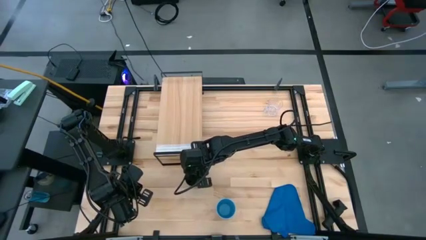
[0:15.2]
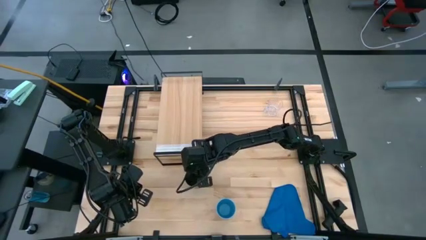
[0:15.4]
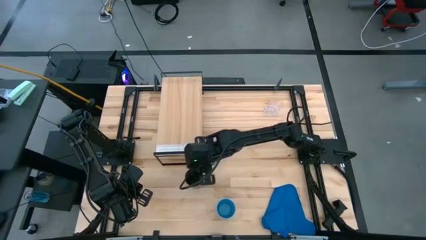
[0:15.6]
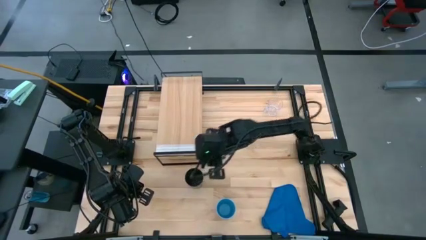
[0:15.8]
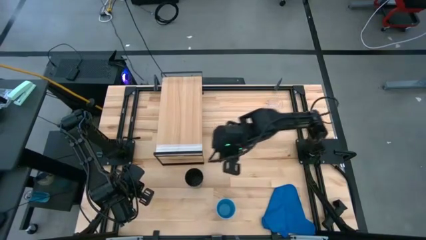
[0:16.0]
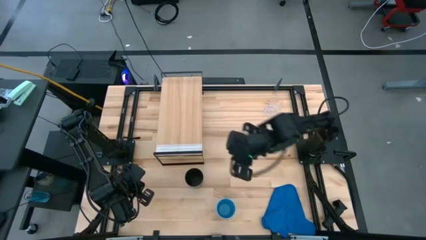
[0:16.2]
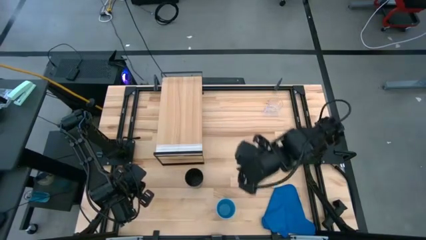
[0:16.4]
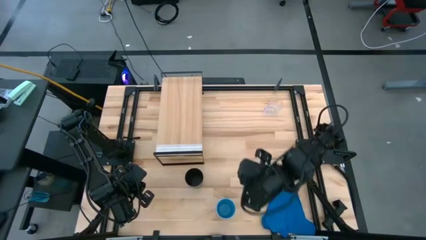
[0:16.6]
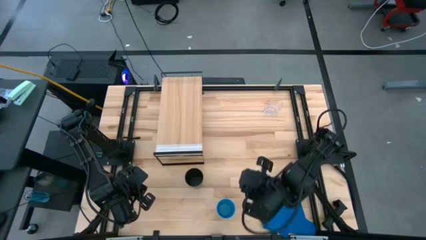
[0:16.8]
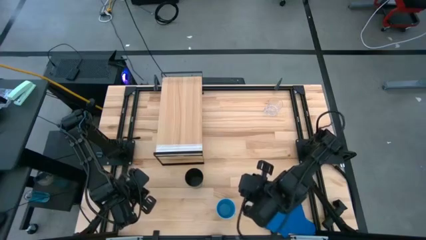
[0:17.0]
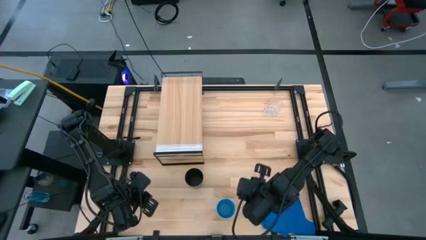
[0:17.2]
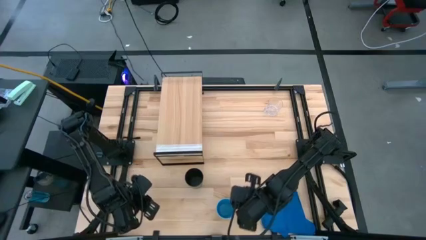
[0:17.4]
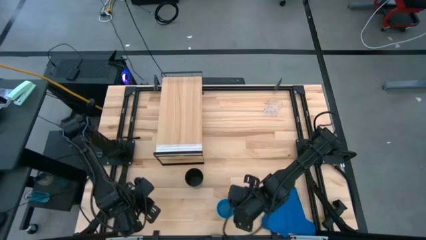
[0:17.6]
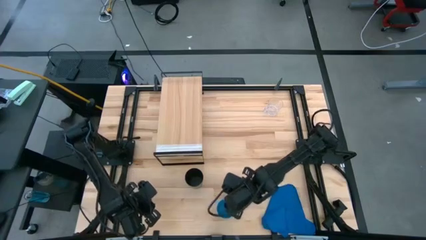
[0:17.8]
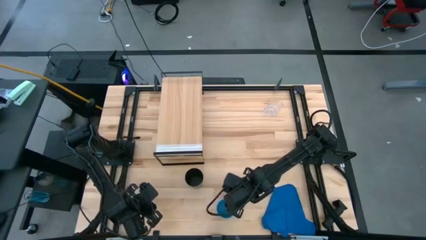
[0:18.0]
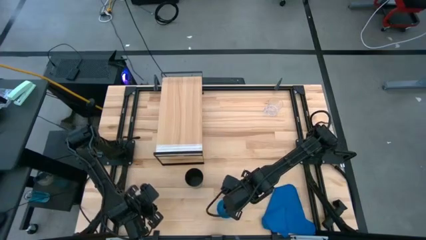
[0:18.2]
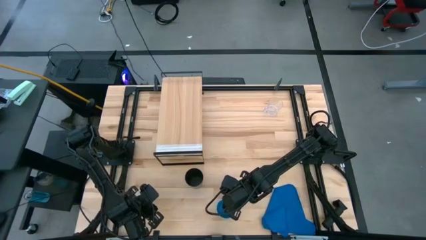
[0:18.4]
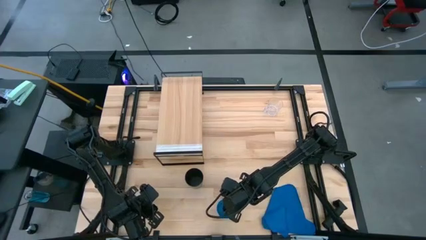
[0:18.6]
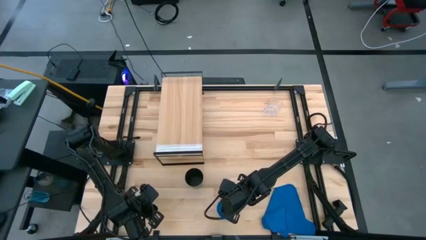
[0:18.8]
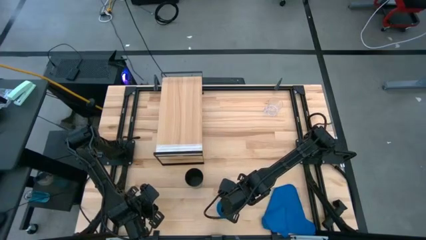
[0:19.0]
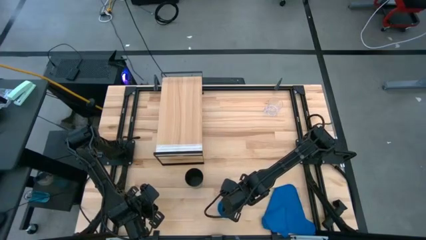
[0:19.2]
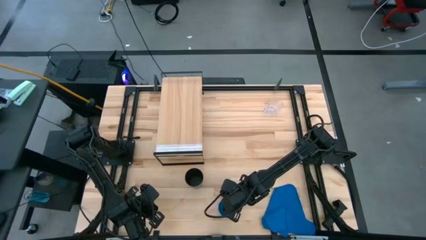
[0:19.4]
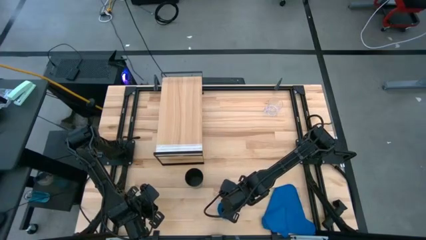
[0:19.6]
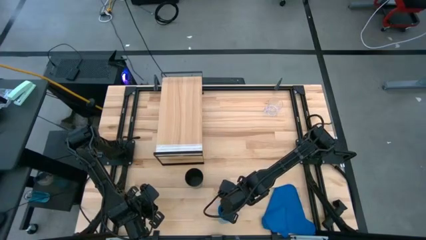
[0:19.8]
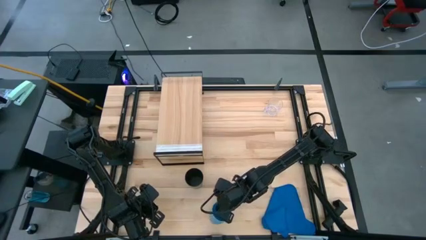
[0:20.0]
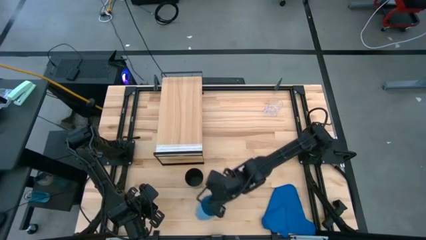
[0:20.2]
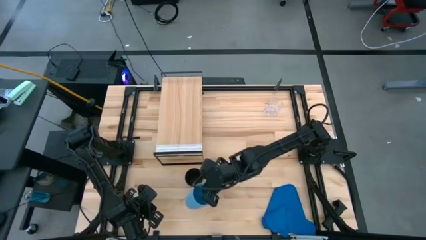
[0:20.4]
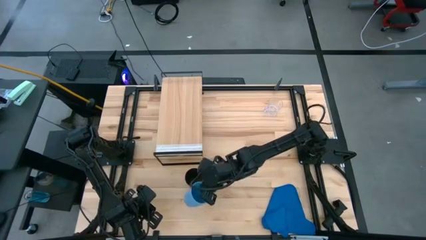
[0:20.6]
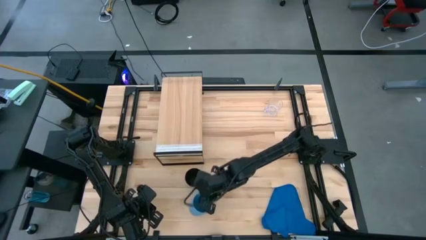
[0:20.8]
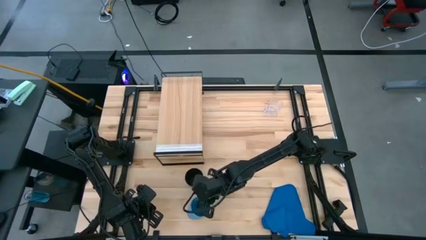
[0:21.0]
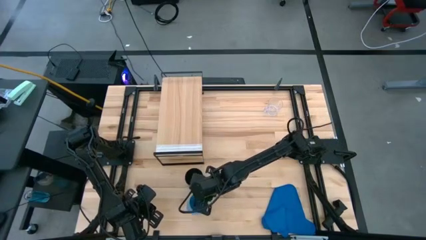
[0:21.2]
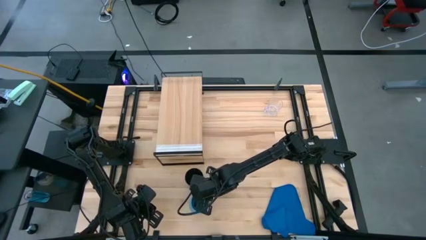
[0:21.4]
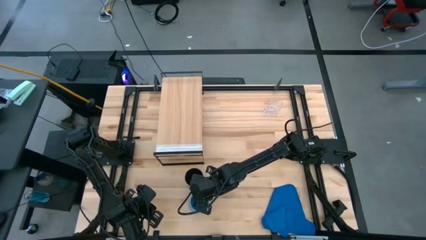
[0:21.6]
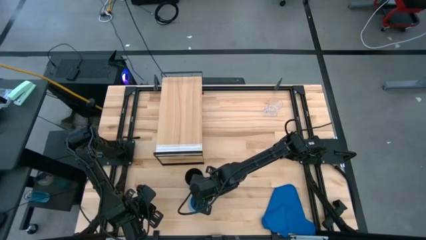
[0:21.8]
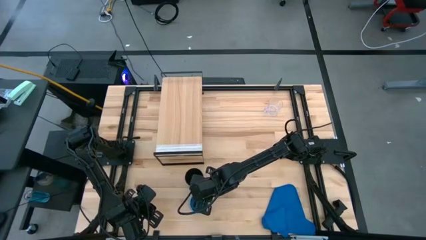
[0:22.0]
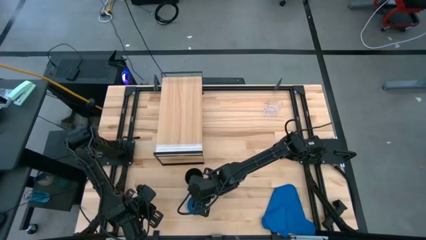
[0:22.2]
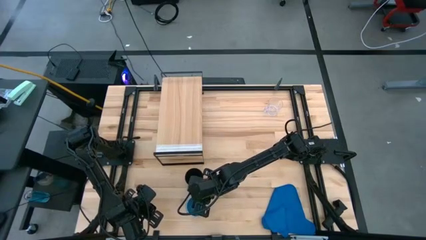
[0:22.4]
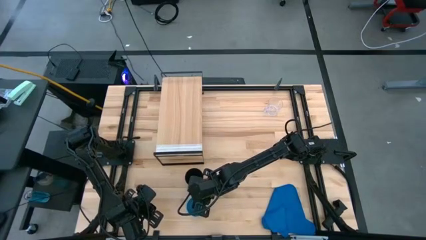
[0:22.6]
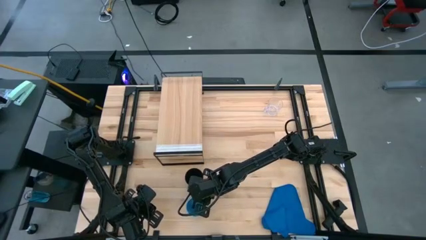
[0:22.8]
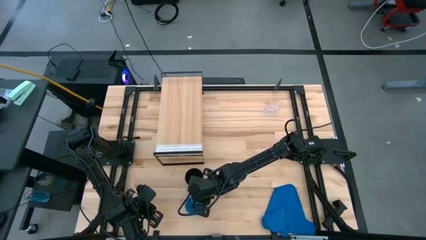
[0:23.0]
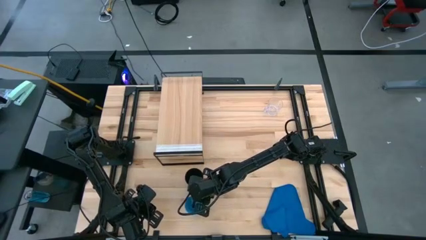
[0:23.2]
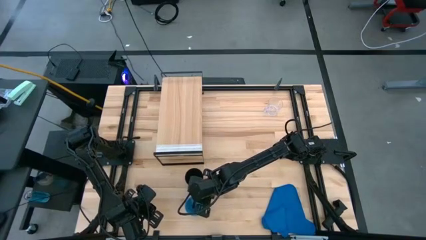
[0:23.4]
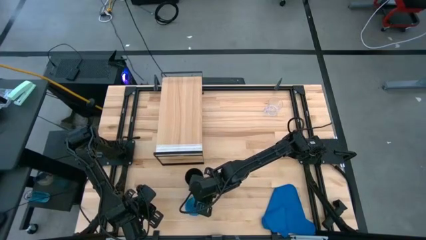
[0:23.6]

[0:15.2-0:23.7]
Task: Stack small to large cups/mugs on shelf
Move the blue cup to the bottom of the table

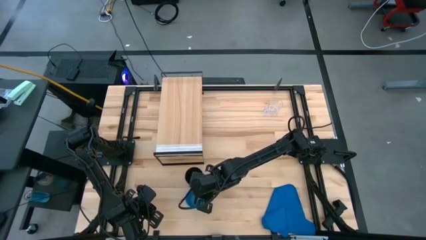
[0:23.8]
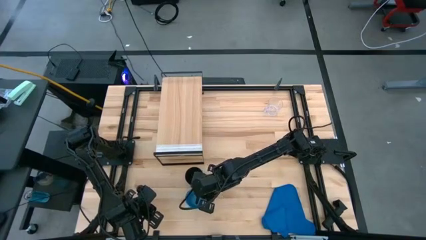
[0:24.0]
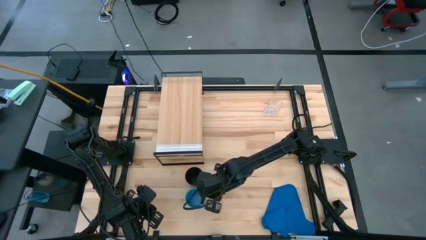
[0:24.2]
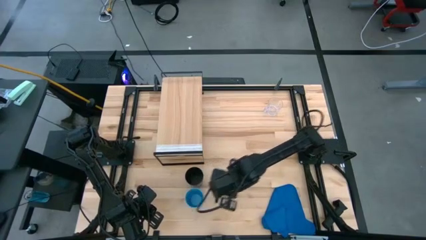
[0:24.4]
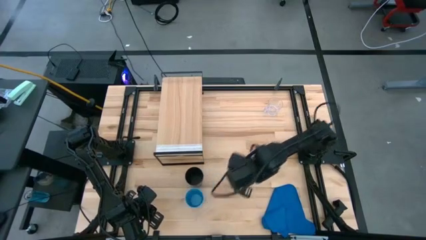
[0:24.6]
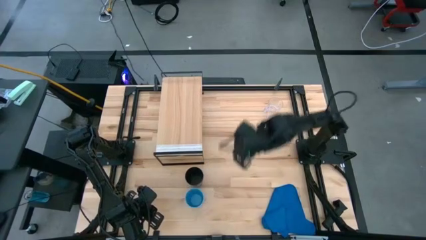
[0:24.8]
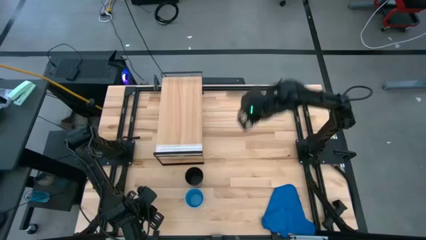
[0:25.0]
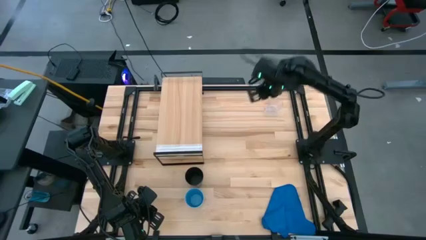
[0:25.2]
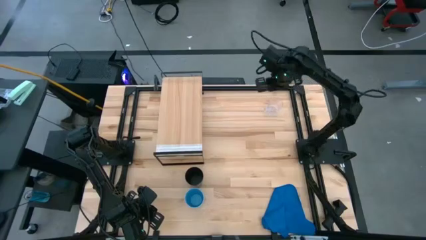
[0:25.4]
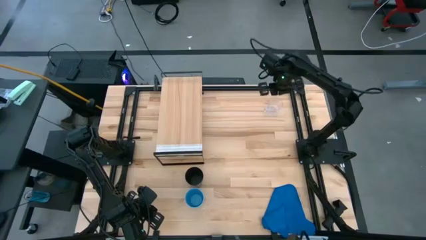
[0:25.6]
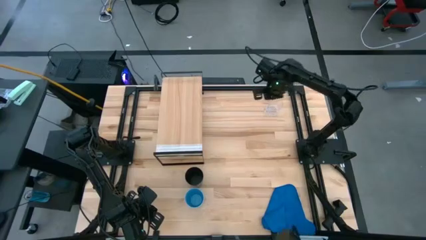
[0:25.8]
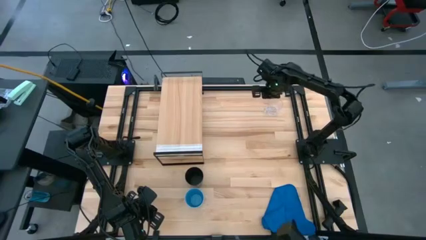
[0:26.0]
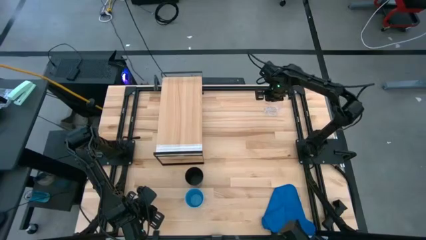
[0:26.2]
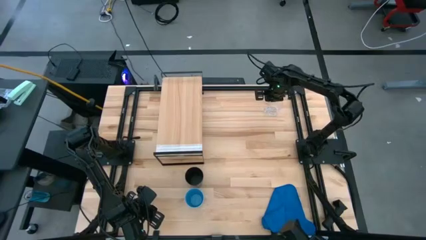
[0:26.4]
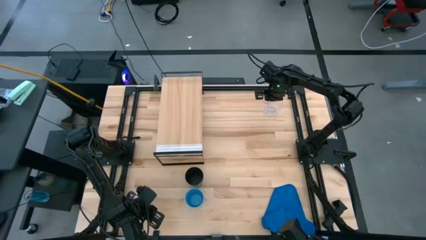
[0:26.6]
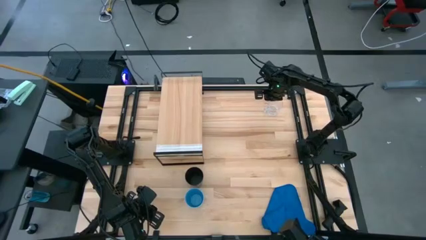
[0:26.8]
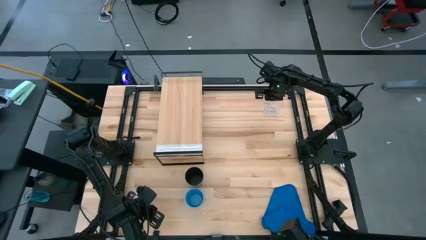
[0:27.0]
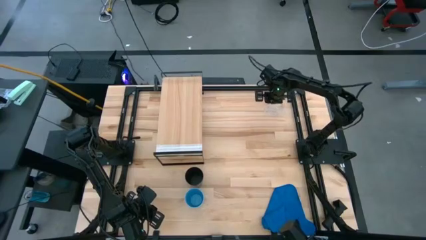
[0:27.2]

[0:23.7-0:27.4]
Move the transparent mug to the bottom of the table
